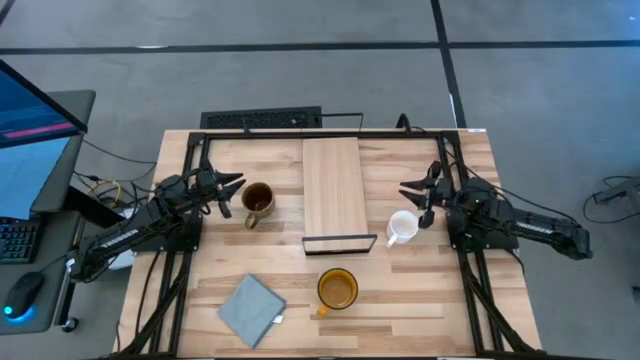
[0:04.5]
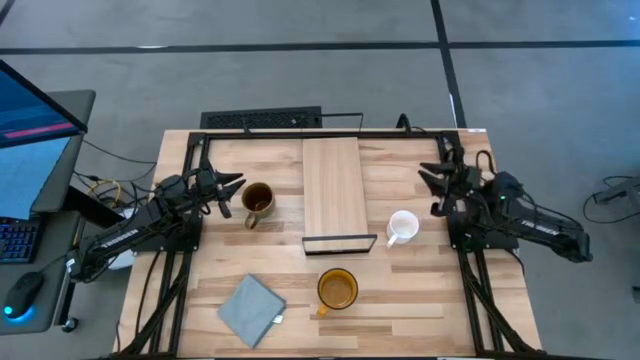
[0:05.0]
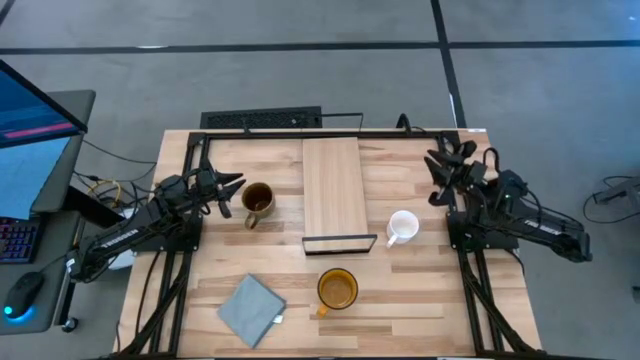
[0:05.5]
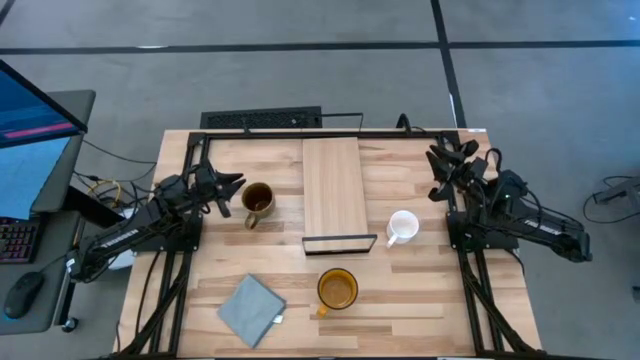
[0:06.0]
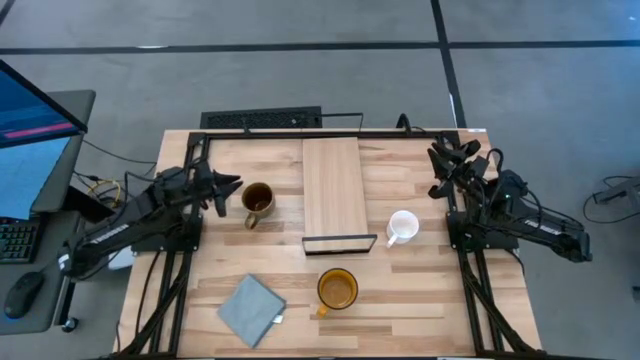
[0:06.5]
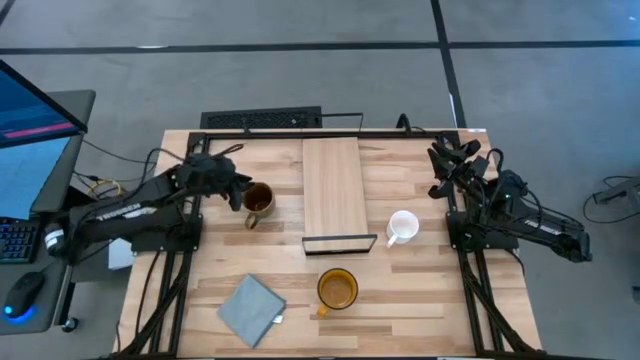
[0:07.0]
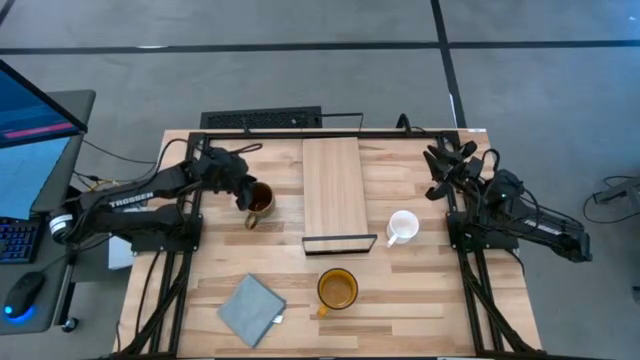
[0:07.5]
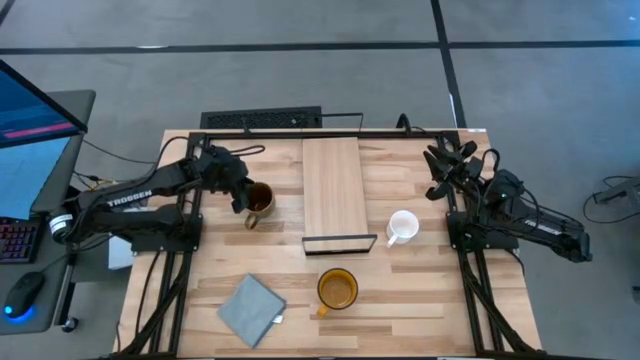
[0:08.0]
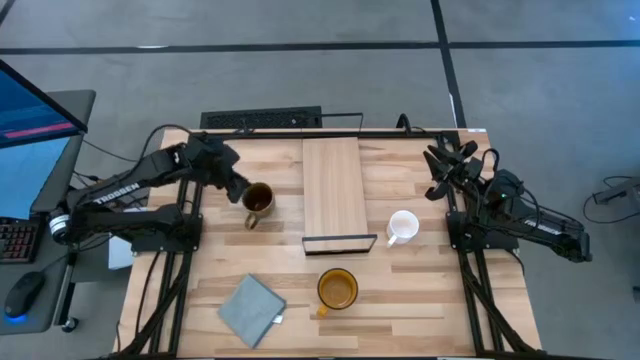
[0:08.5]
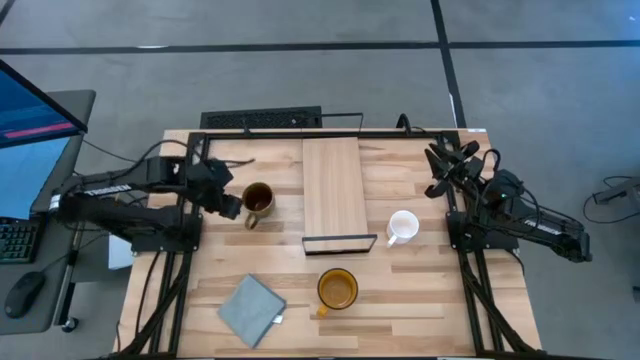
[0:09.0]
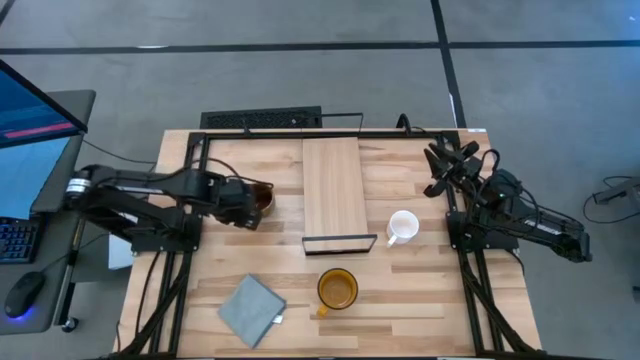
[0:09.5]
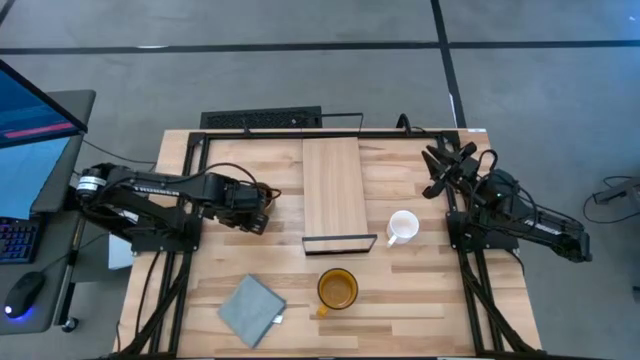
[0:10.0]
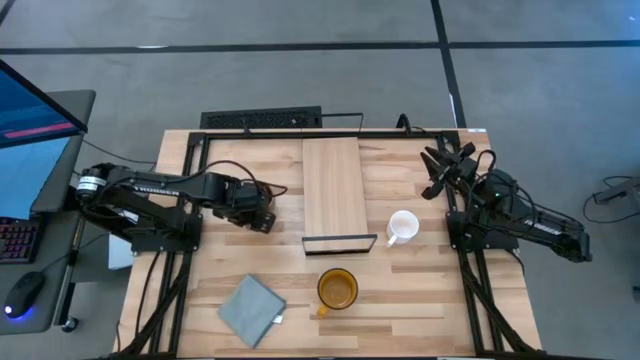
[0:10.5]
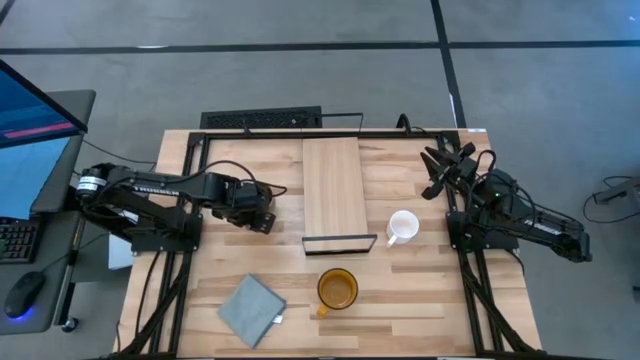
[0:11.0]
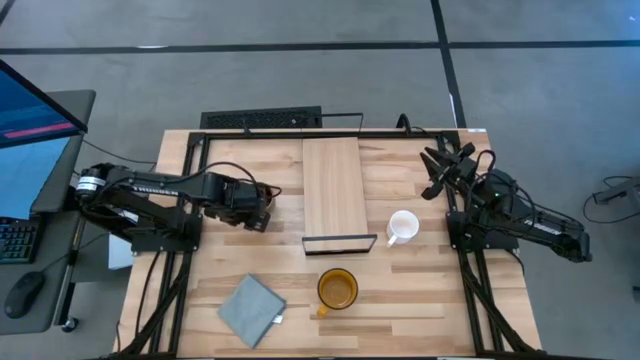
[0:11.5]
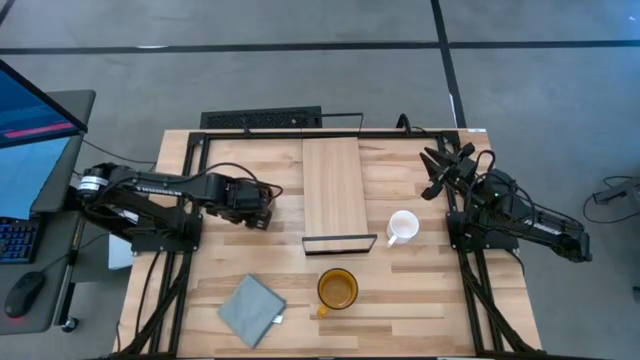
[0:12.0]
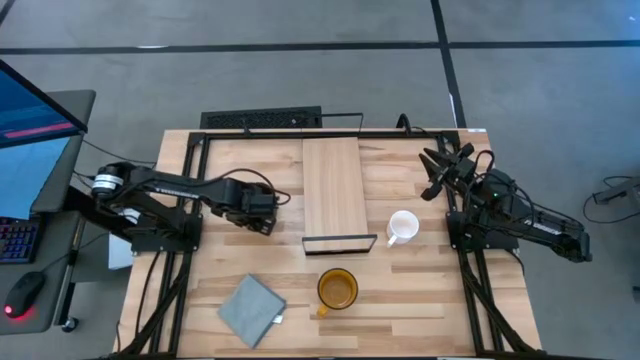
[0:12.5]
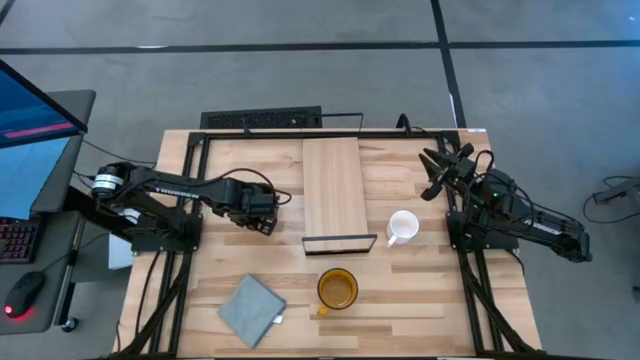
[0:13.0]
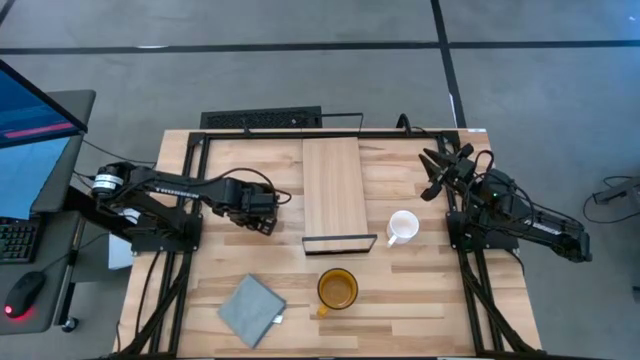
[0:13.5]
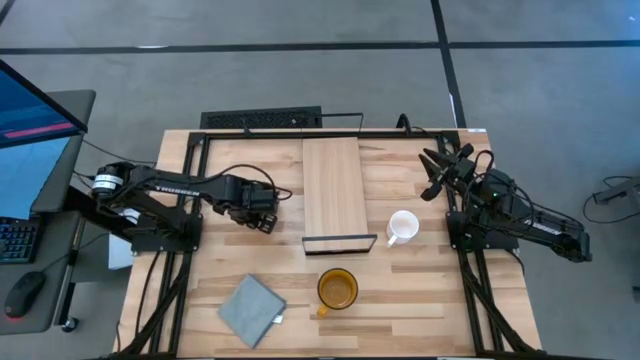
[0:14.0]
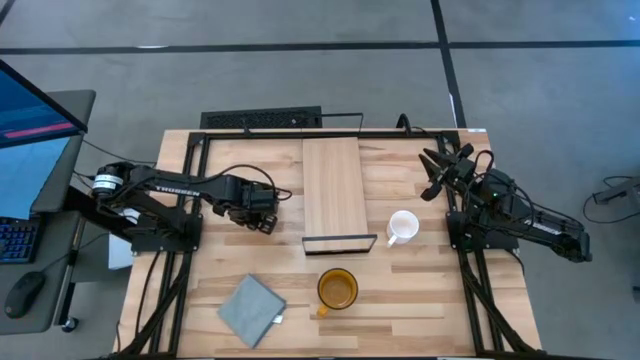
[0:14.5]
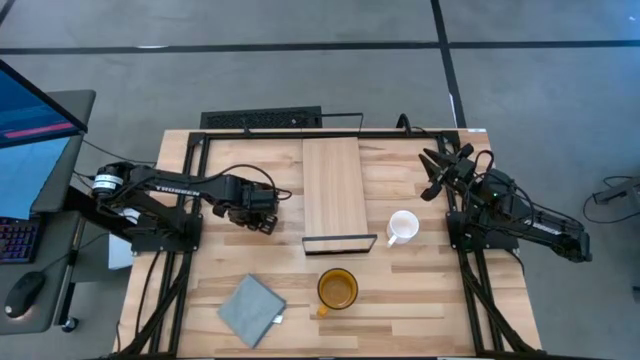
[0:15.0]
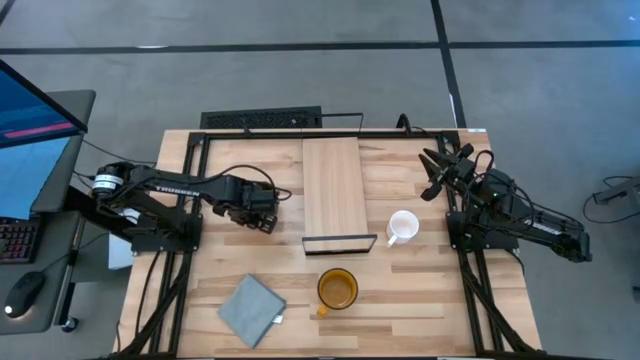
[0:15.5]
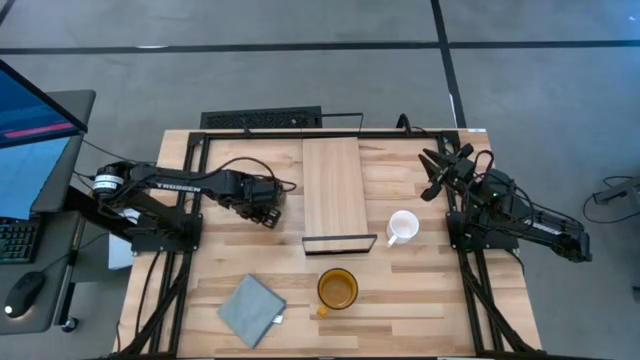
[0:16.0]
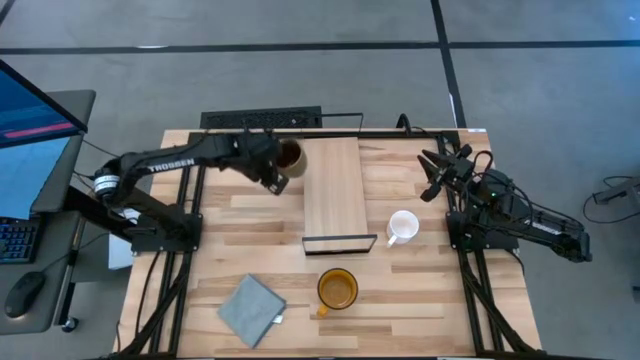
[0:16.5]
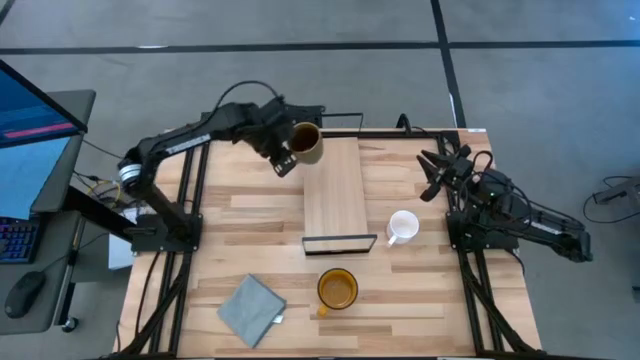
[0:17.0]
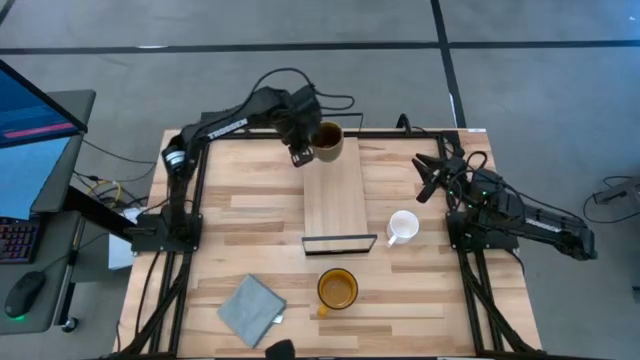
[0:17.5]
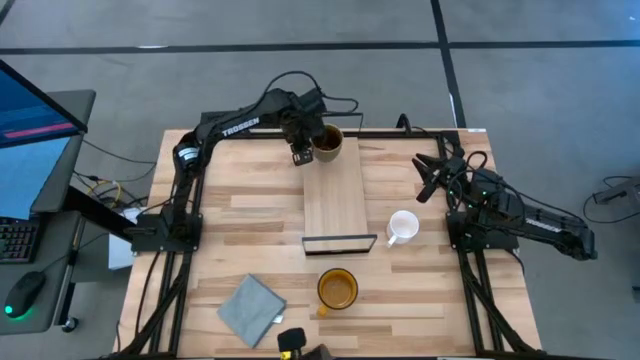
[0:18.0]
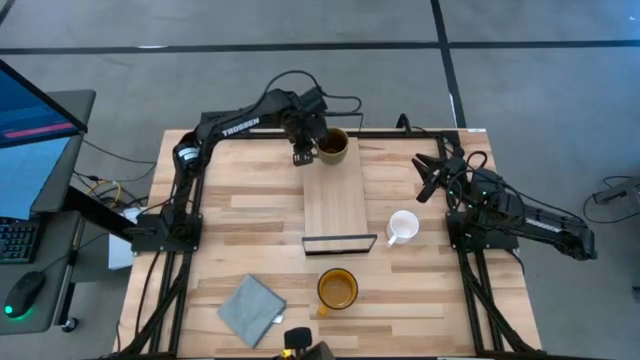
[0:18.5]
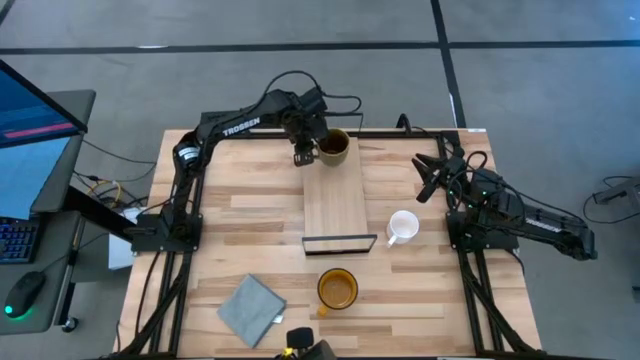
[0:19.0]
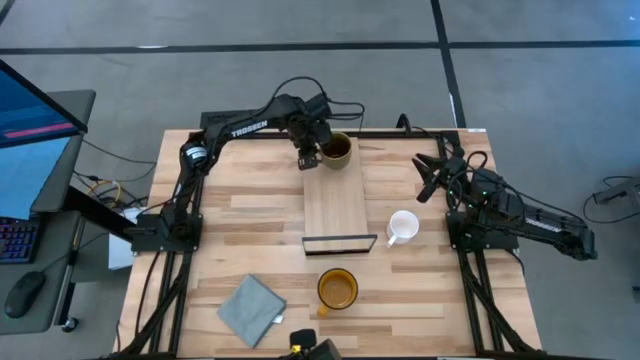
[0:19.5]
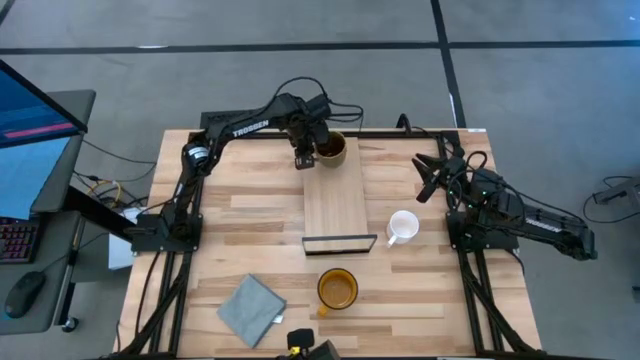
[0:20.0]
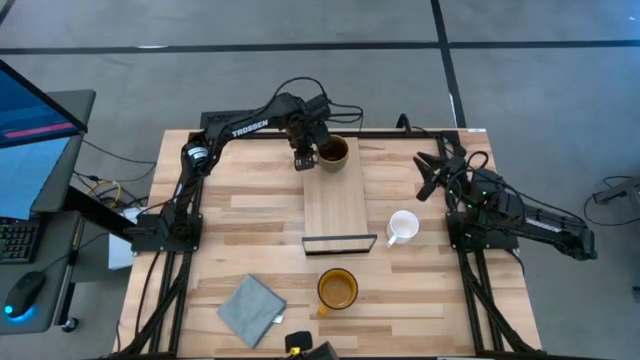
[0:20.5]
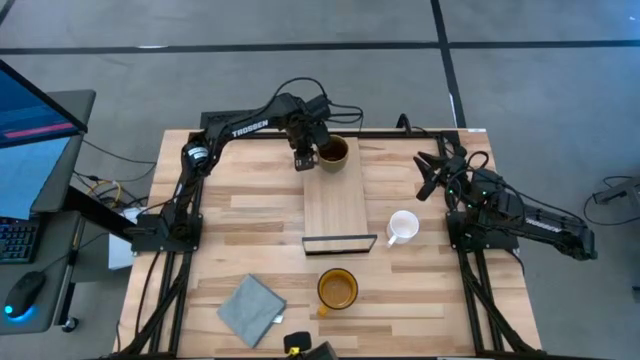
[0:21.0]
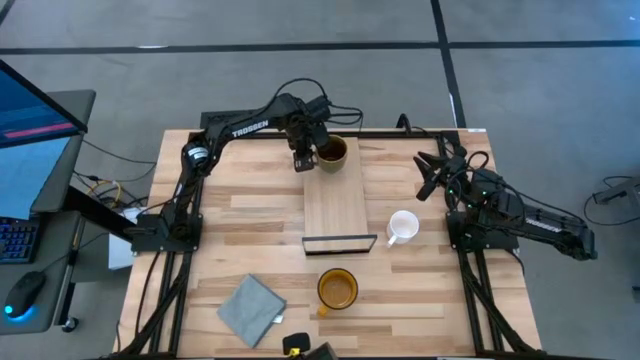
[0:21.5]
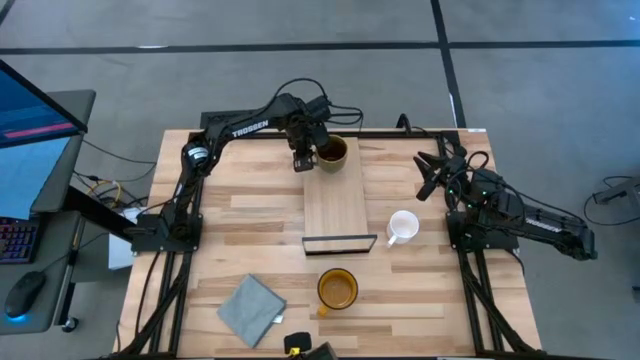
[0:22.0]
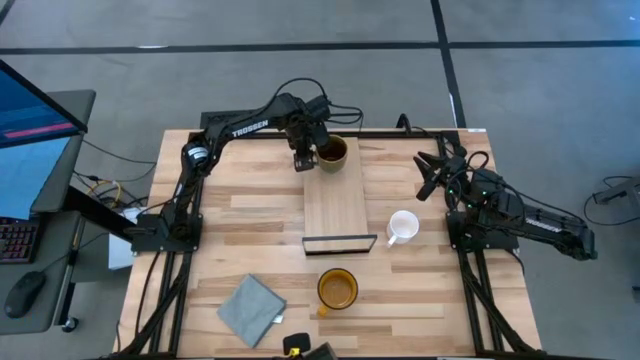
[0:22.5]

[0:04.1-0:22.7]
Task: Stack small to large cups/mugs on shelf
Put the mug on the shelf

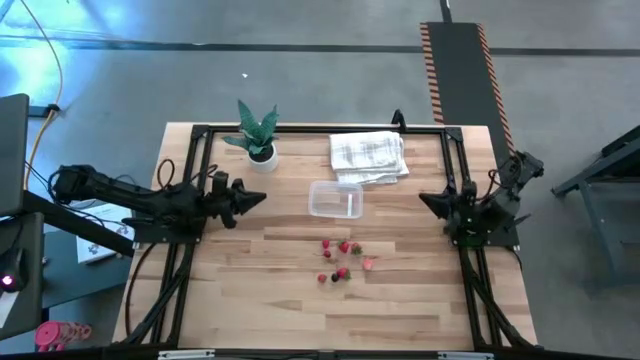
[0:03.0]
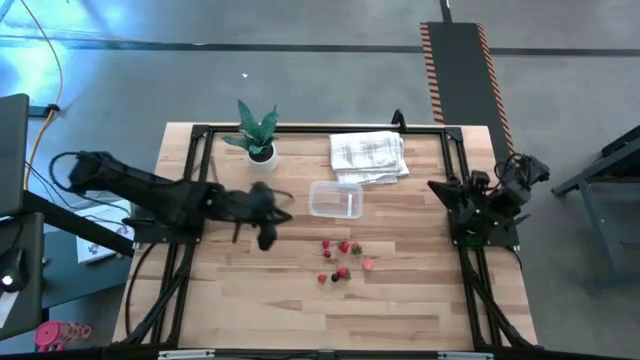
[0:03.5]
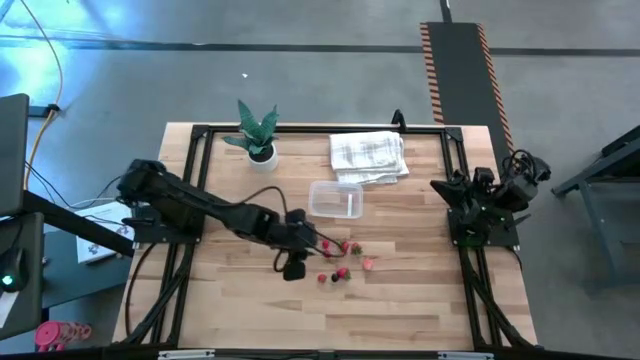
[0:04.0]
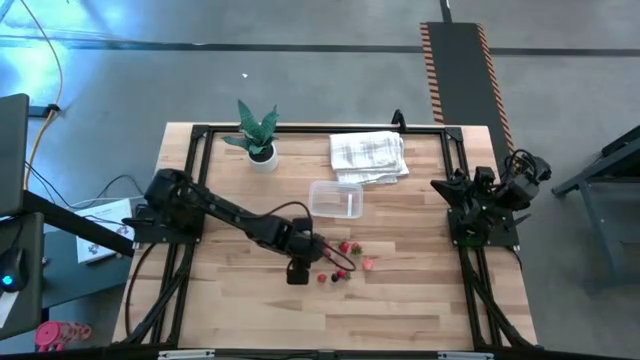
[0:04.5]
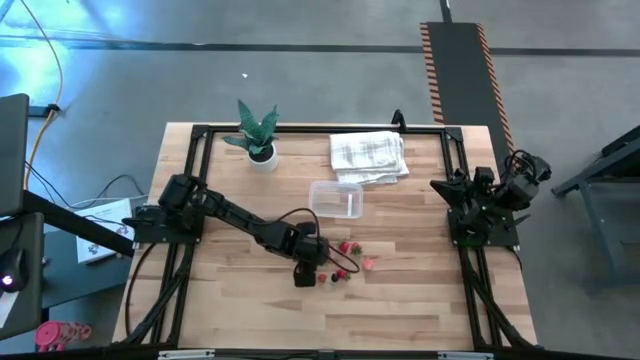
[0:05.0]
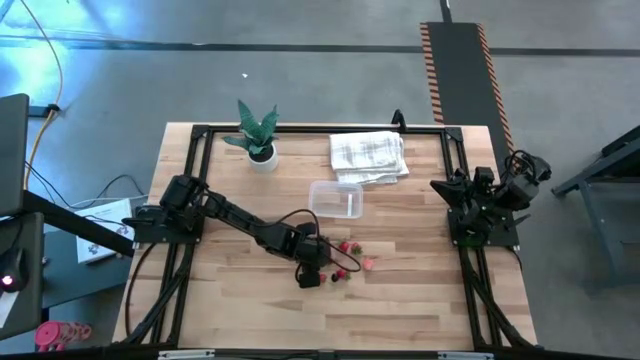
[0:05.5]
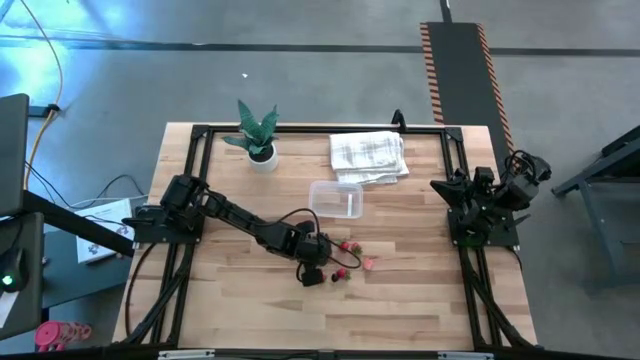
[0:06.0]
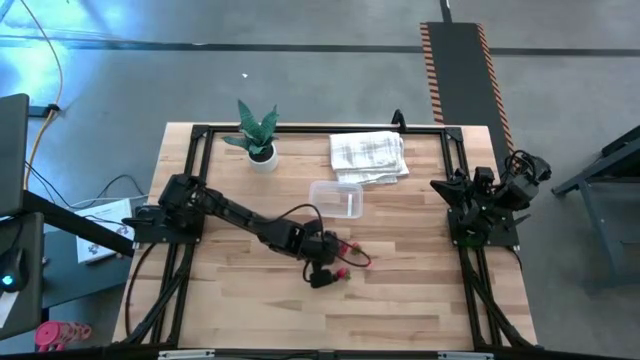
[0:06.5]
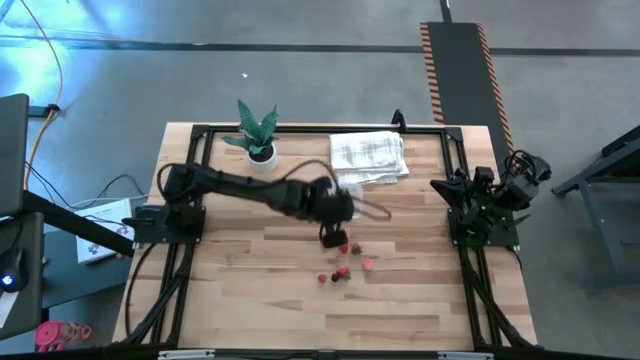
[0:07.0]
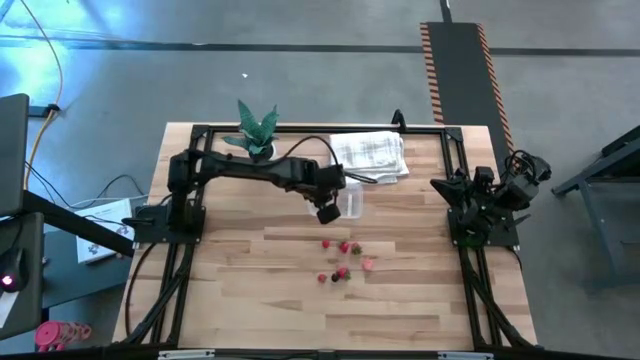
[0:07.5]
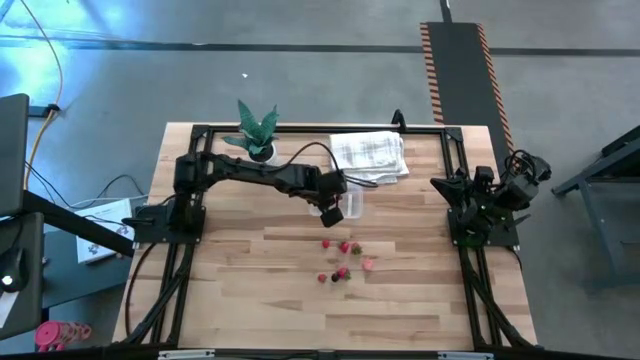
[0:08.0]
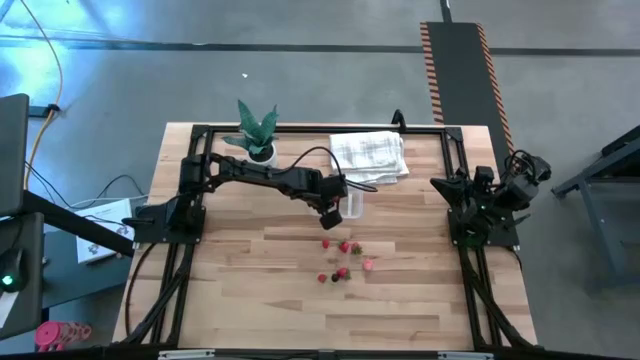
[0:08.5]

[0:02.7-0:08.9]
Task: Pick and placing Produce into tupperware
Put the cherry into the transparent bin
